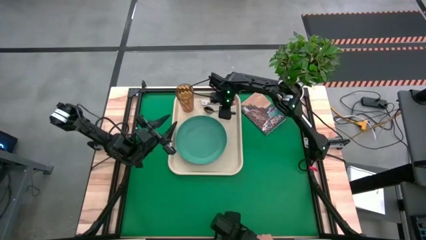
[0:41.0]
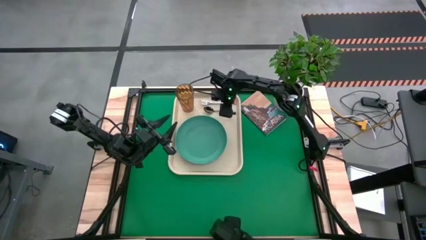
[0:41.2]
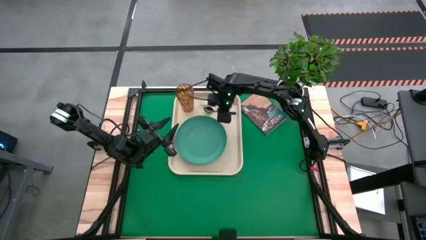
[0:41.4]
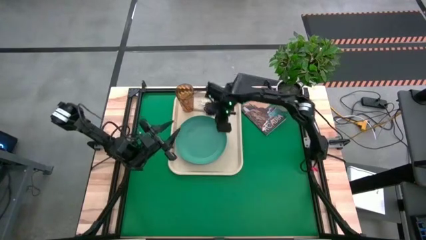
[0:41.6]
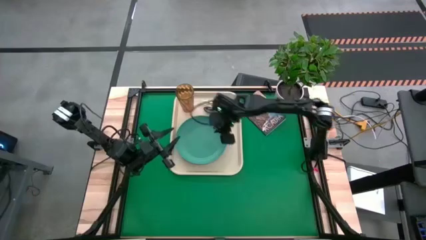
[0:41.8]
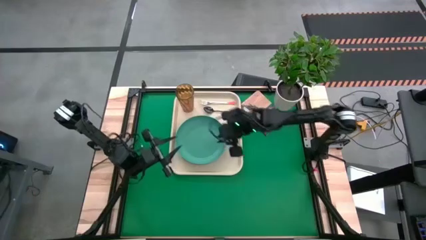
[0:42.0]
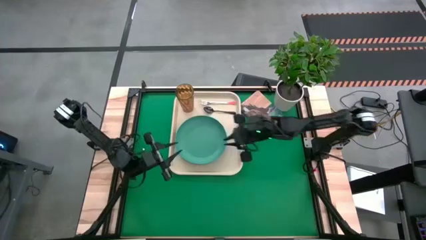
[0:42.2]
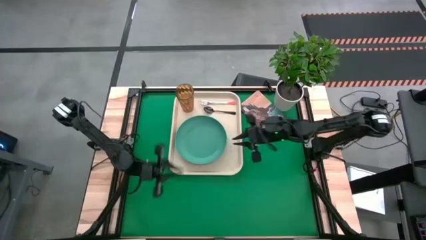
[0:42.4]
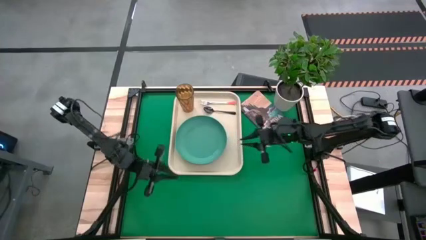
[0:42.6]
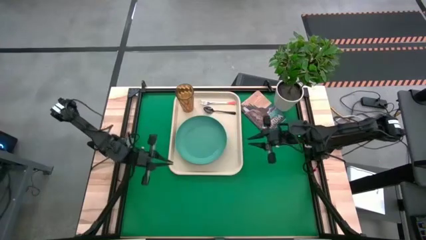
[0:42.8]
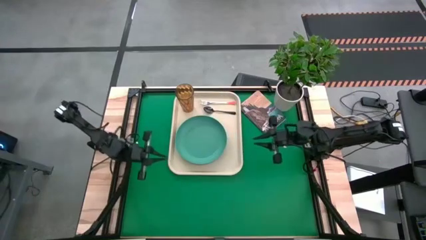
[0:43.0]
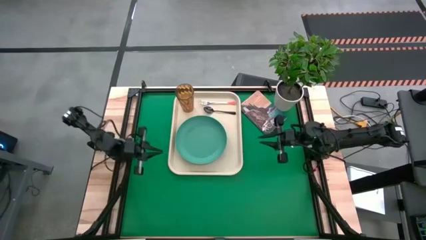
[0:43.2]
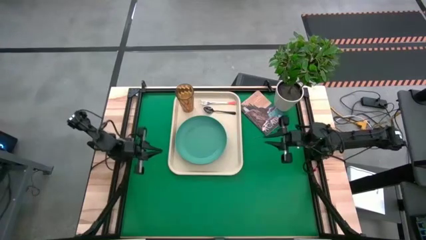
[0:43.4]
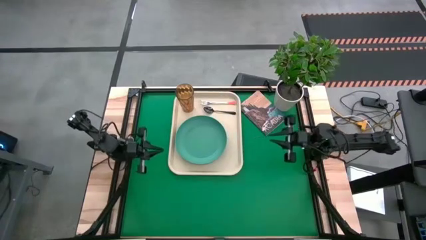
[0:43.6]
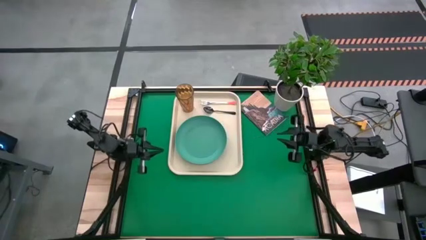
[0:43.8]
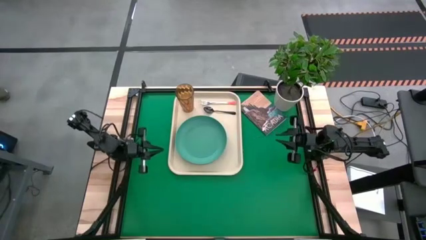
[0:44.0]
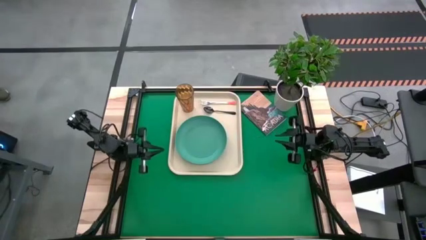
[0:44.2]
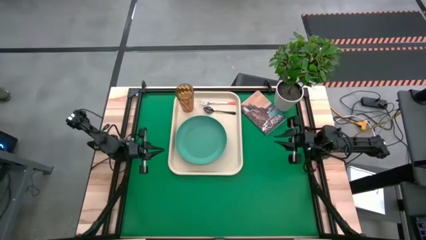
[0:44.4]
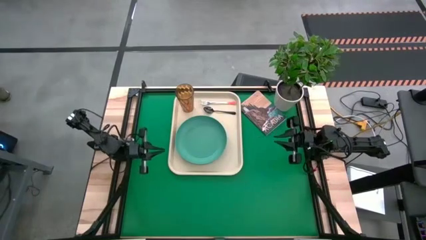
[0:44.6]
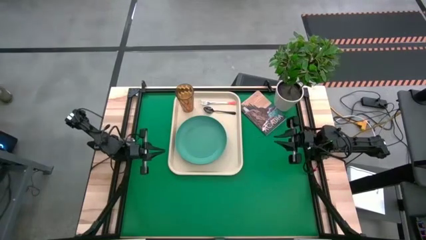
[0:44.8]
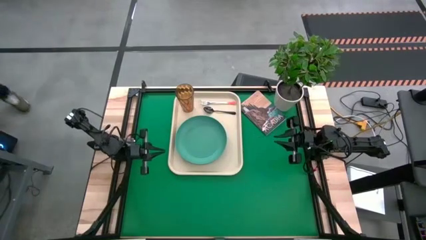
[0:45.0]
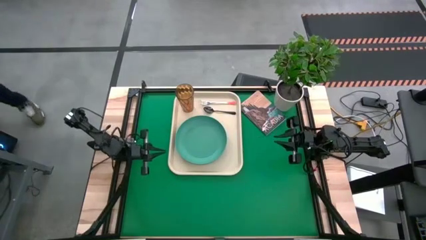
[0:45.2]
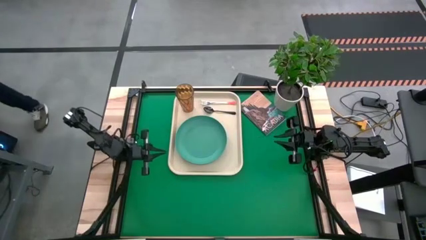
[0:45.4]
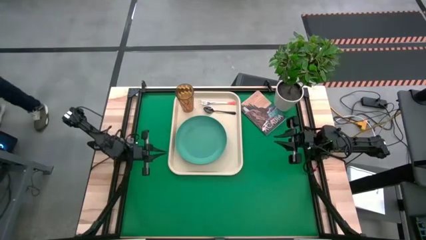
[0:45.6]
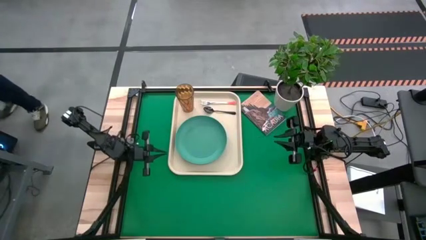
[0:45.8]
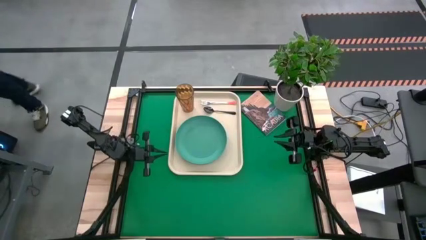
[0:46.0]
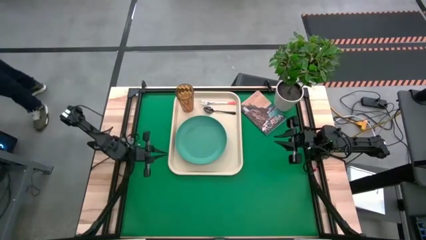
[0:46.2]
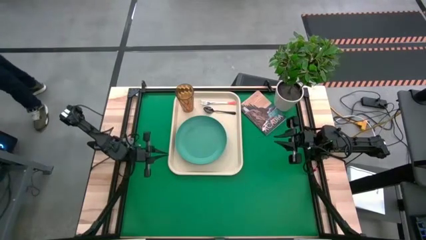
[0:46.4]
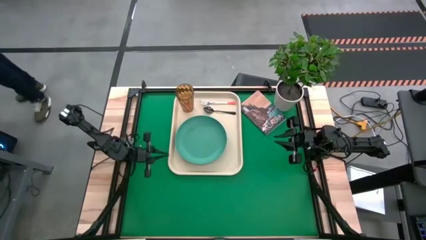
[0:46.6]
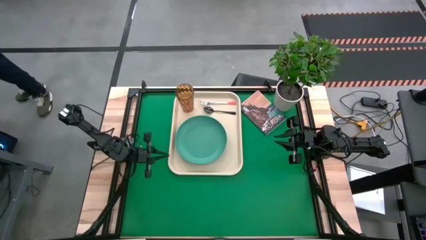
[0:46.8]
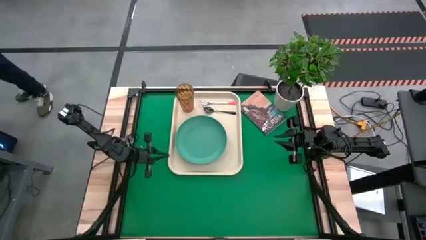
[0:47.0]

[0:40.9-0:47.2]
Task: Pick and place plate/cup/fork/spoon on tray
Return to Home Position

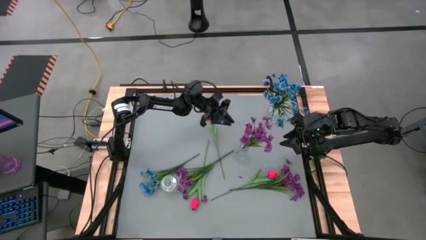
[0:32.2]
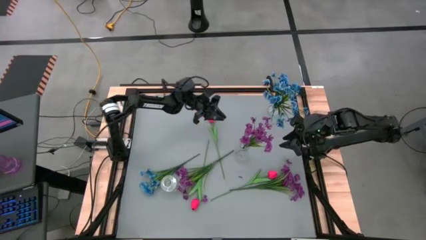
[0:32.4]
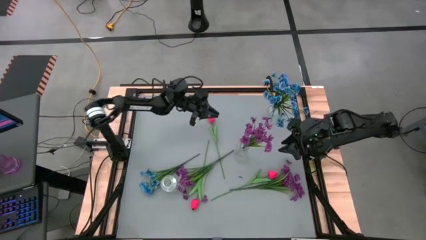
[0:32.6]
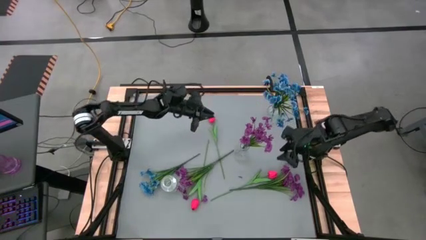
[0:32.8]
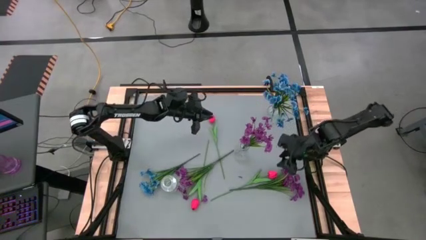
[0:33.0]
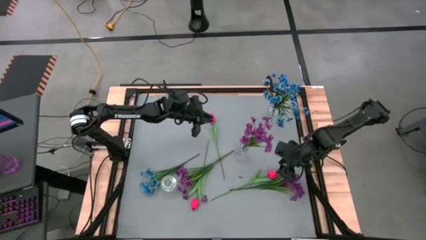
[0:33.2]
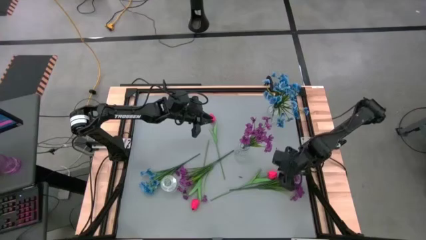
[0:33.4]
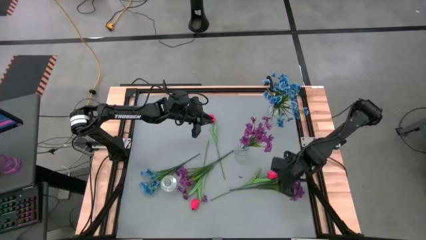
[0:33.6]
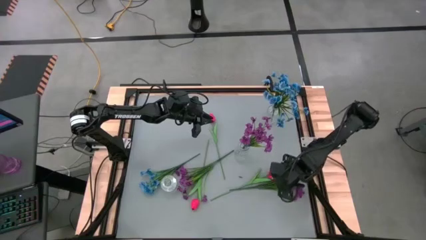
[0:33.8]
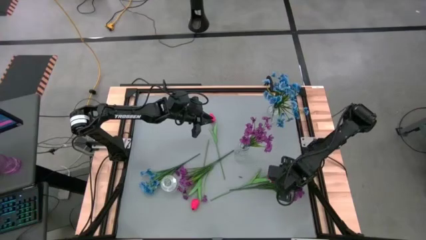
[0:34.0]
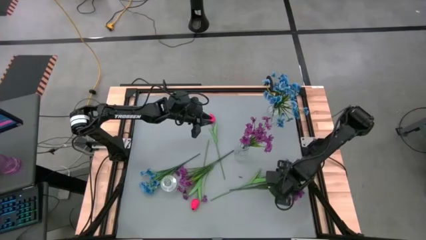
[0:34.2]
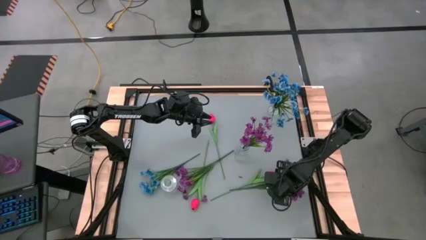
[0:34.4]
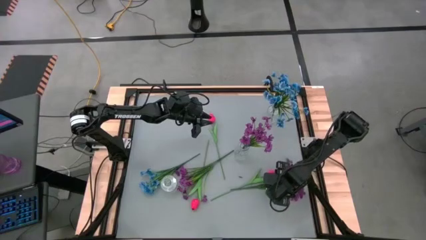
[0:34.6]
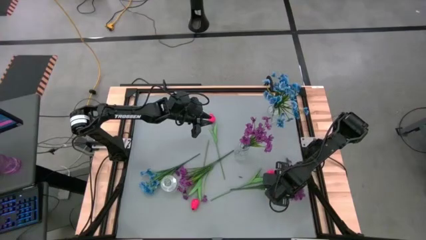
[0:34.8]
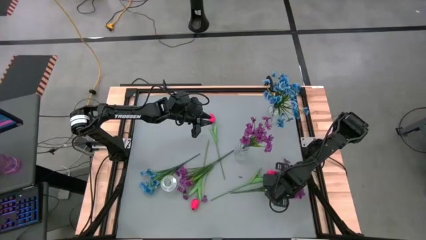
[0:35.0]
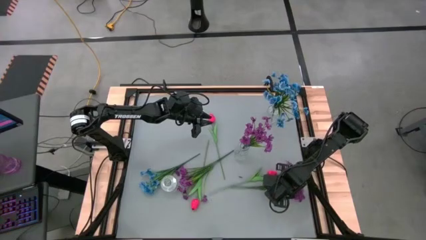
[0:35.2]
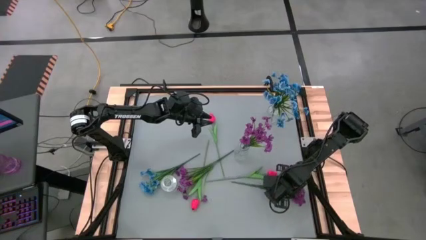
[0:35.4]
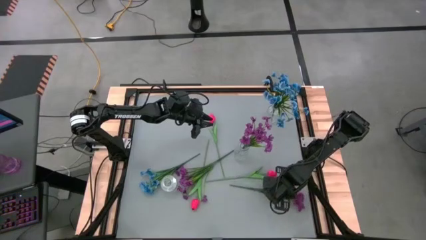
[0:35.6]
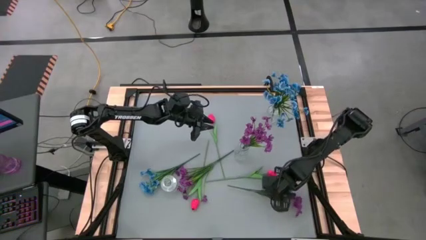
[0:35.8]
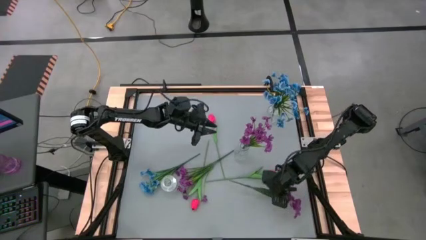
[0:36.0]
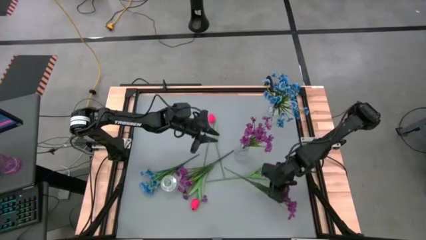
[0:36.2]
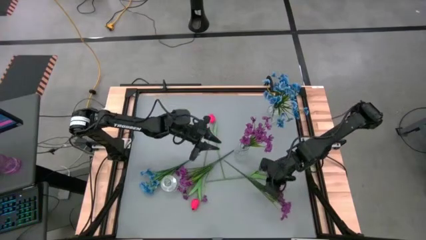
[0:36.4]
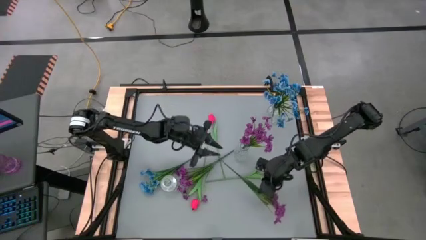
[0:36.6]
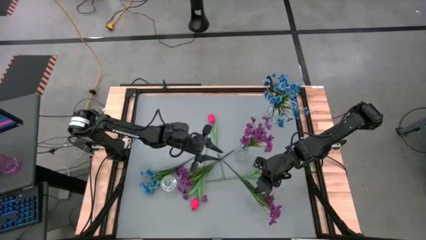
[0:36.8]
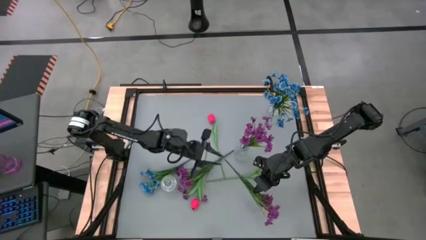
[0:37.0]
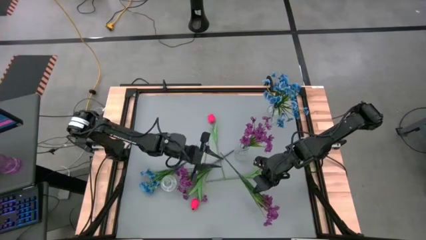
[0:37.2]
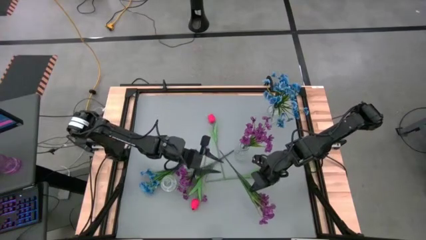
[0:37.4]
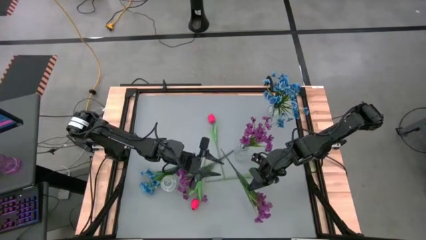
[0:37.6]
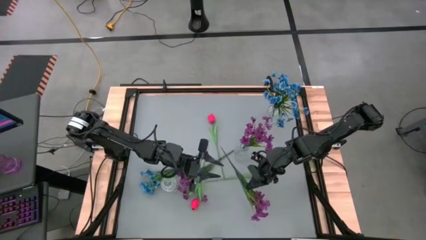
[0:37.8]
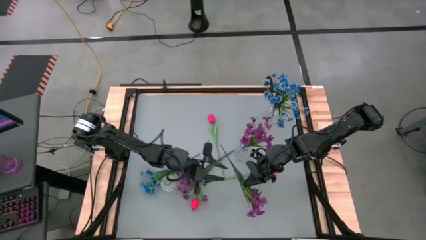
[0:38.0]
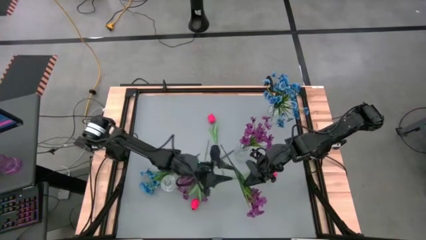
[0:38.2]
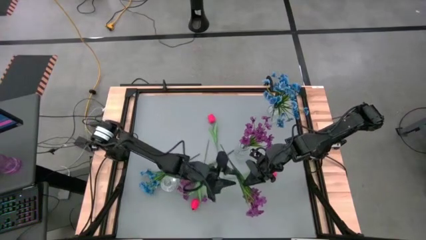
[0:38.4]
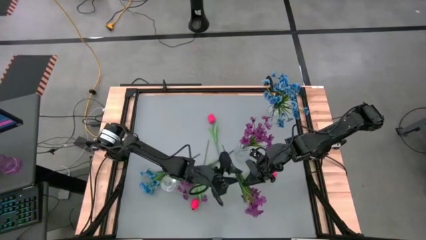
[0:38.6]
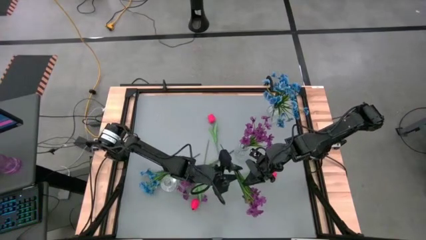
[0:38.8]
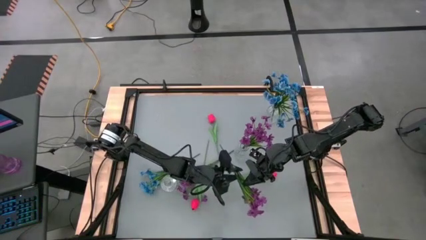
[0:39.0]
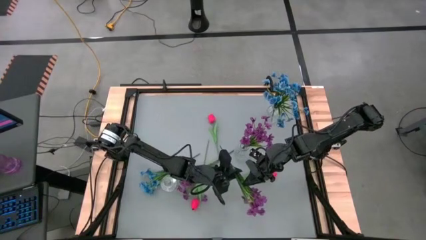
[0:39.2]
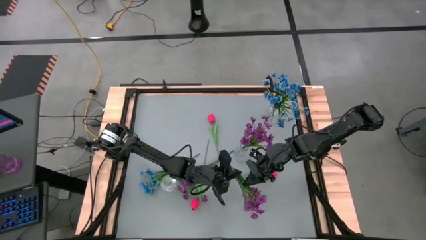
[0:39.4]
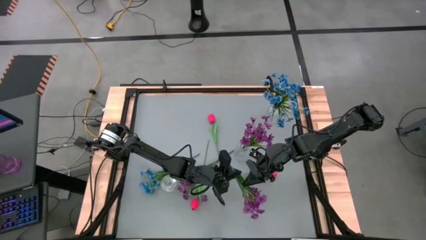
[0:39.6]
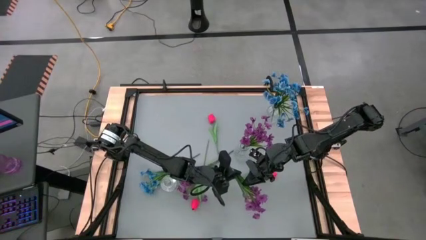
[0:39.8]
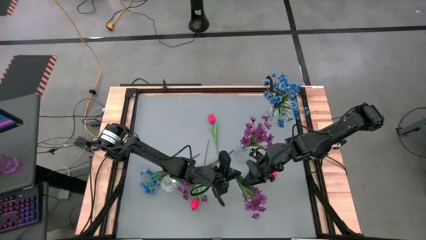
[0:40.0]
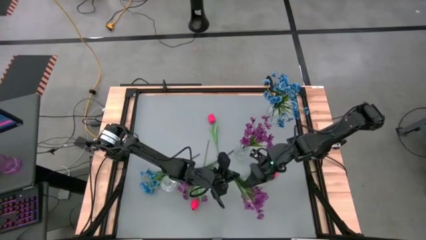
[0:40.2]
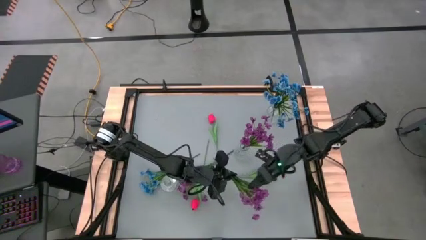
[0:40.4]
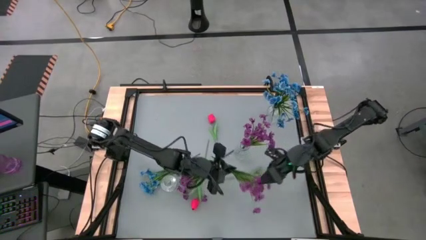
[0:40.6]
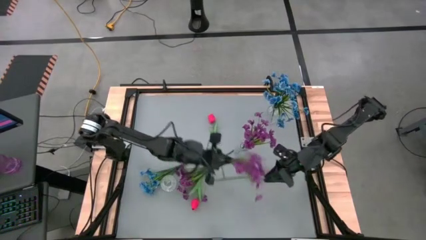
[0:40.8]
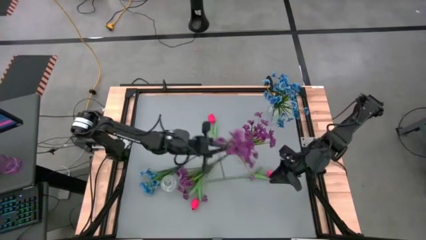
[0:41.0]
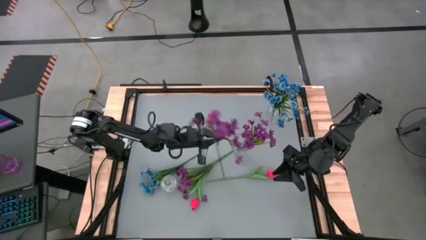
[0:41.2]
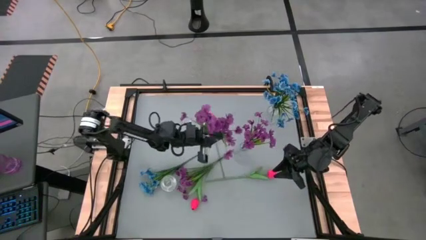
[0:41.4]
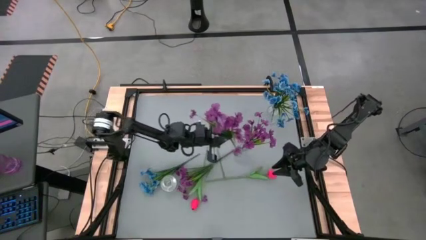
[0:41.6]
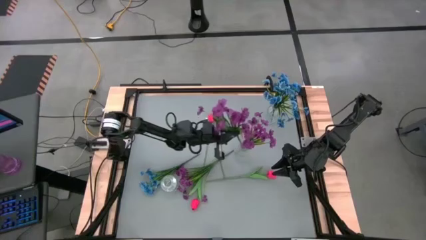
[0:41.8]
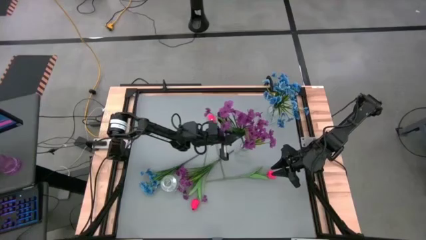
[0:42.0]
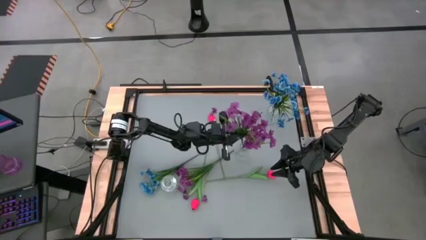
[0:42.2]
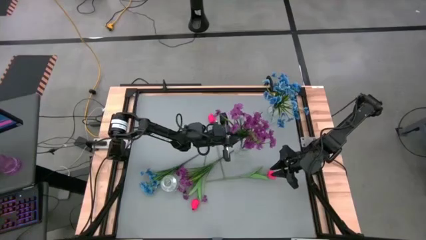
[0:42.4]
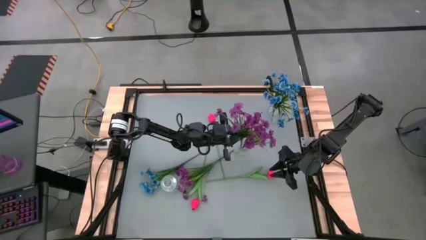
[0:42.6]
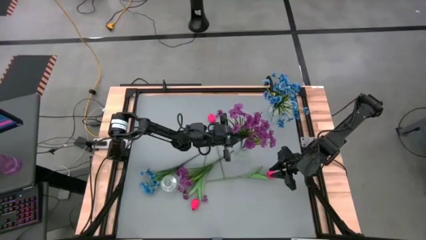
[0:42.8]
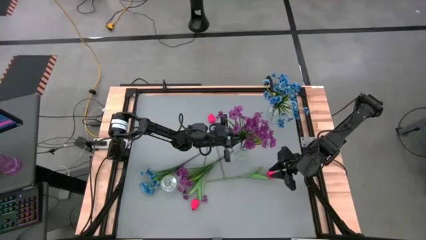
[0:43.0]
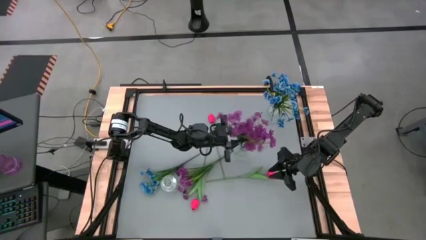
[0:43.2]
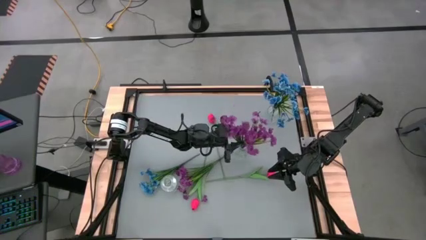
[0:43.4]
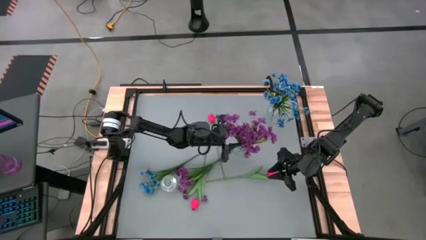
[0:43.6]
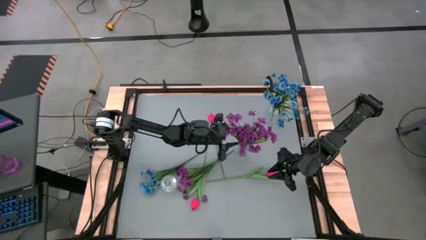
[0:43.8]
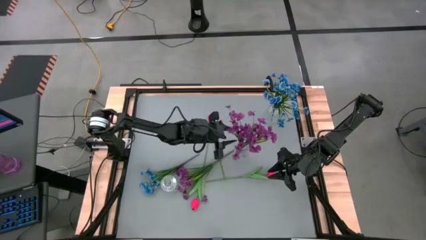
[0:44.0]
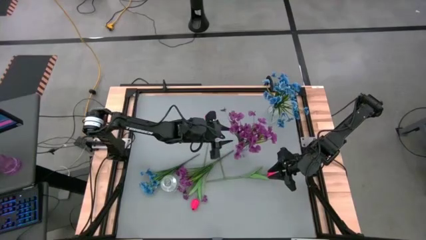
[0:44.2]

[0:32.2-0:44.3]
Task: Sort flowers into vase by color
Put the right violet flowers into the middle transparent vase
